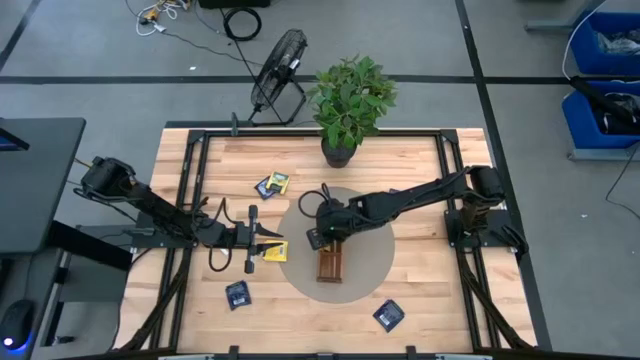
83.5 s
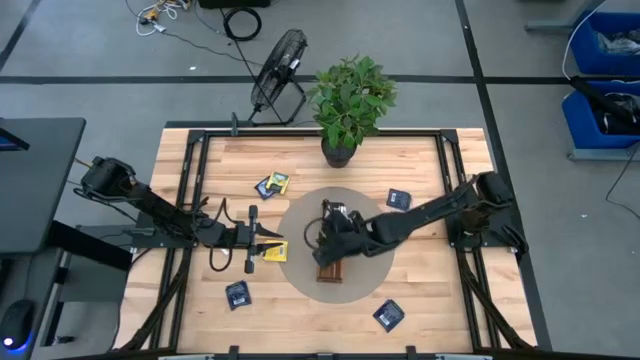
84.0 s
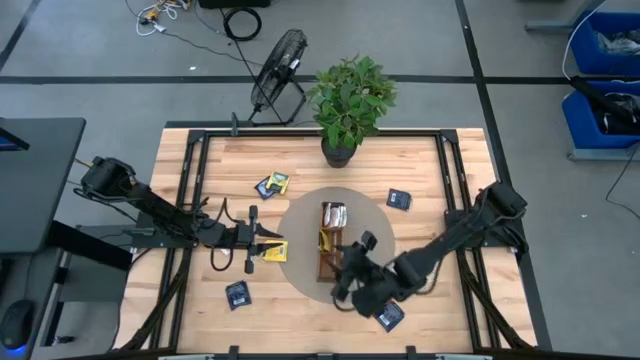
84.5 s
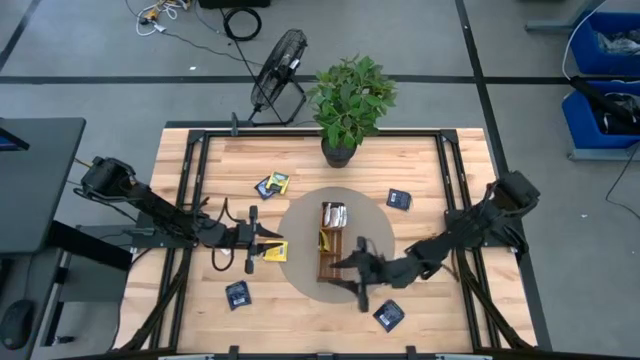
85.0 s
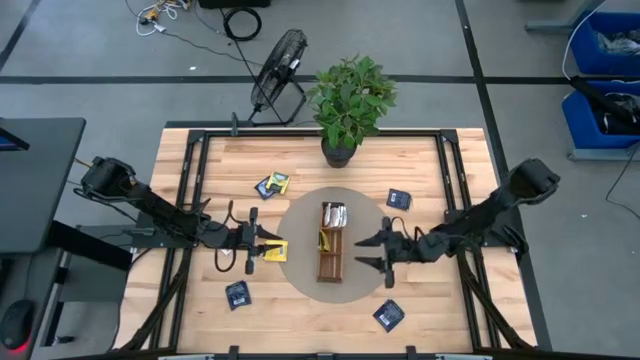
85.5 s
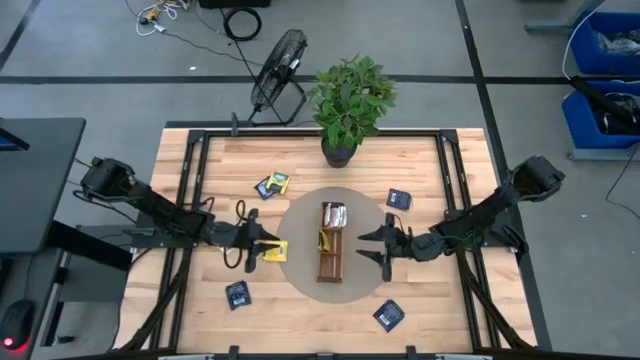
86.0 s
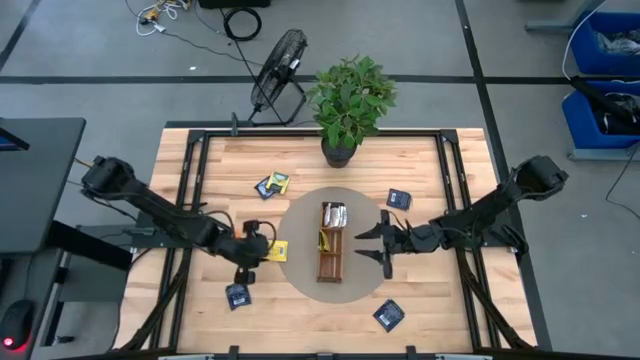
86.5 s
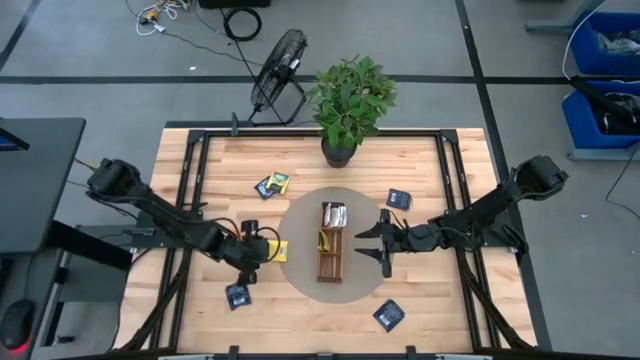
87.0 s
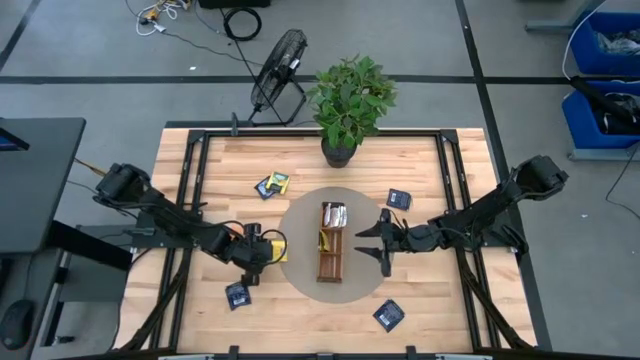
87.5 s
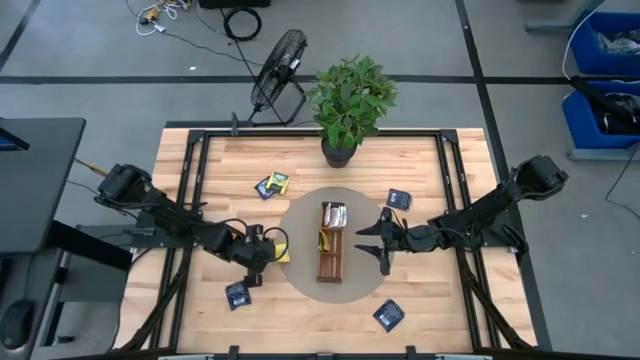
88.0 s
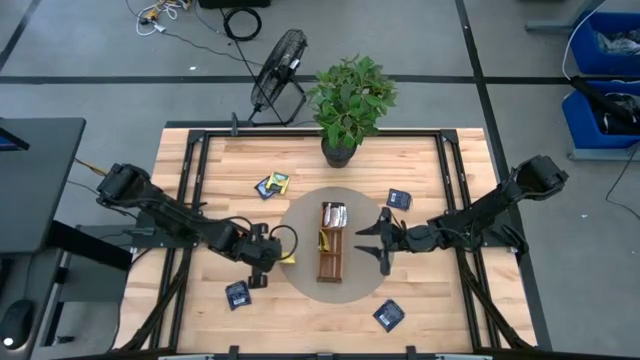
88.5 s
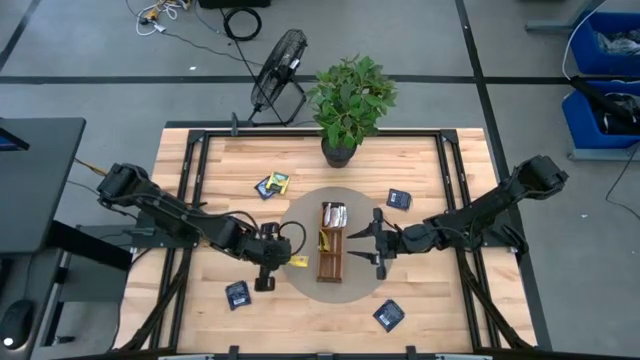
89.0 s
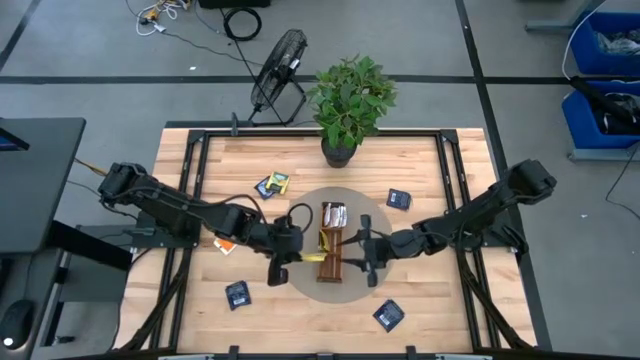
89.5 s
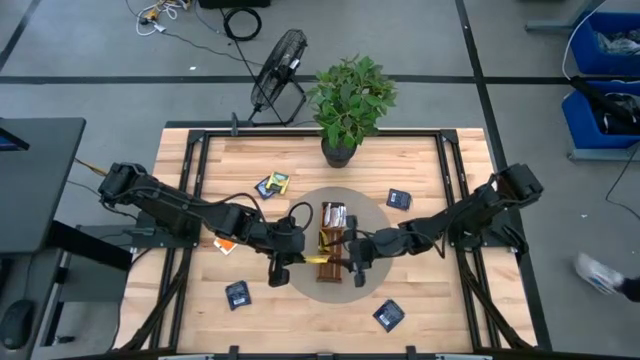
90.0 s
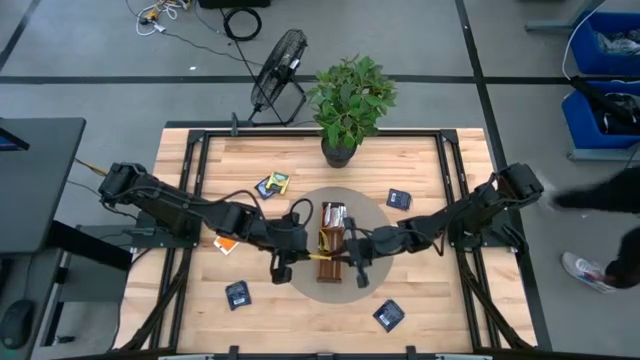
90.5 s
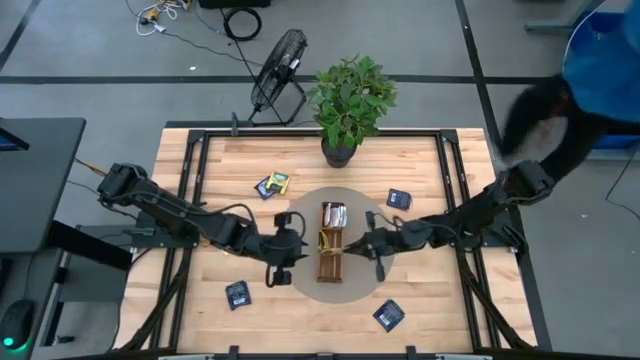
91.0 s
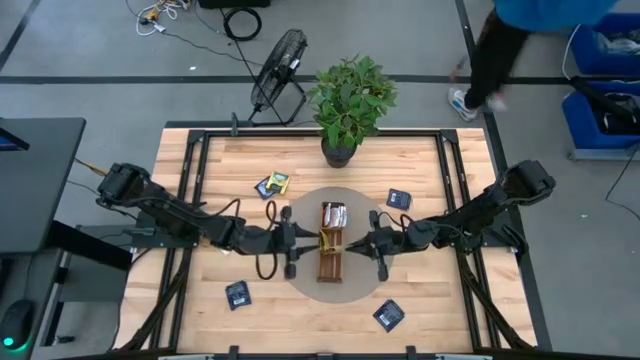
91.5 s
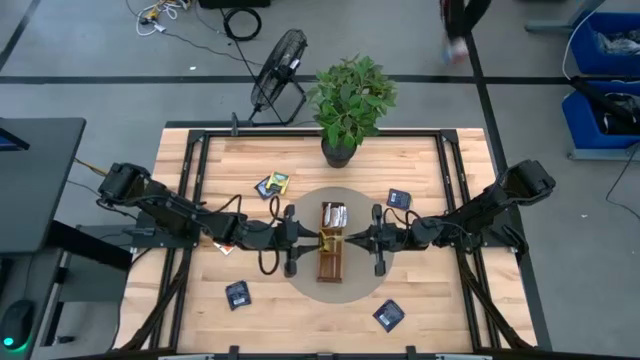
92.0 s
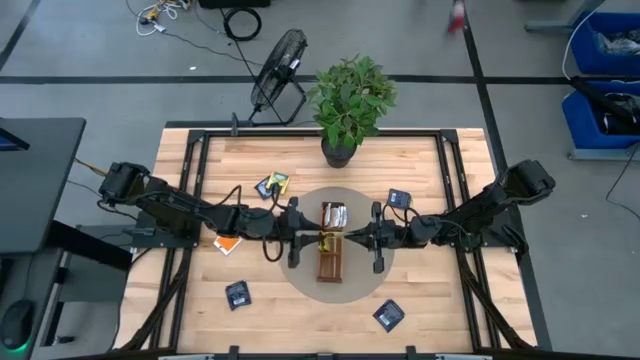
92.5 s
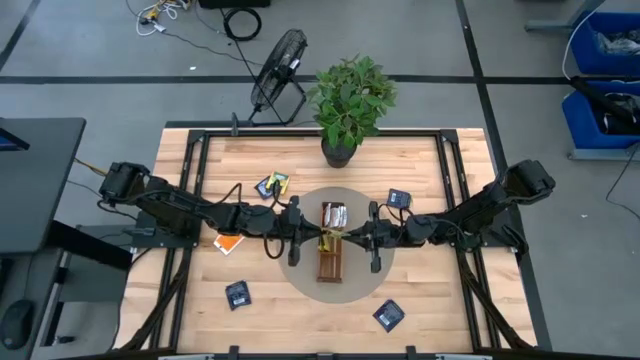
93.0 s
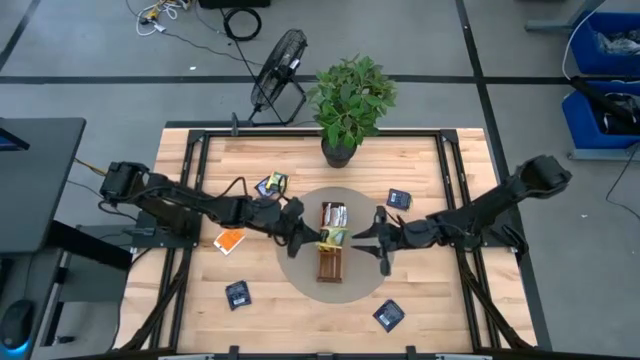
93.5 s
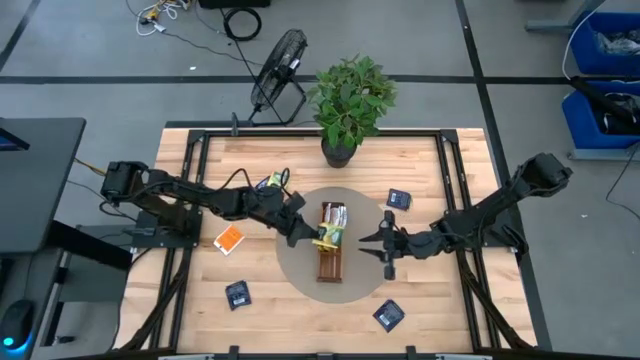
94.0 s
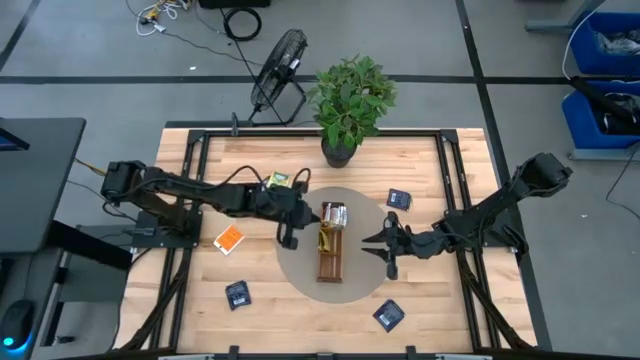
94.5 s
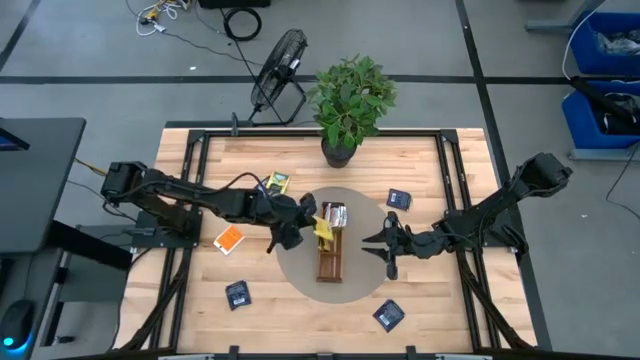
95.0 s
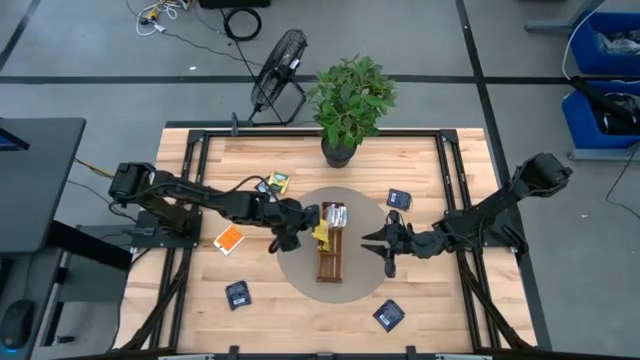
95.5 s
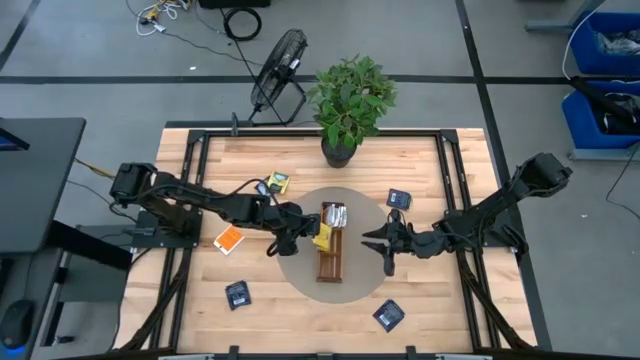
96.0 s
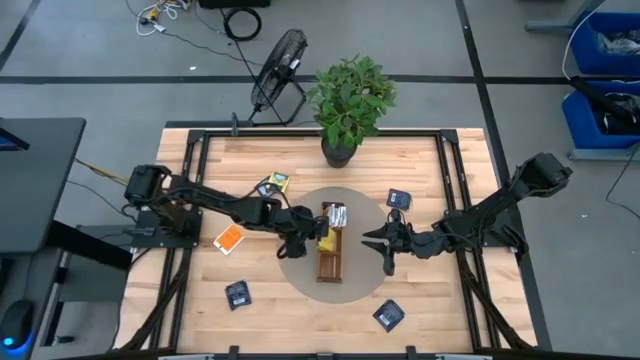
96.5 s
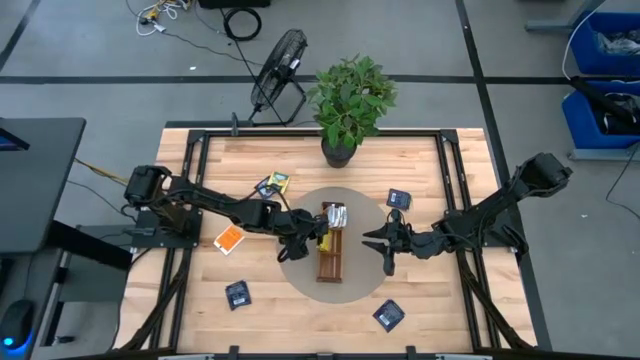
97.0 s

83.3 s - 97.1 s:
Task: Pick & Place Tea
Put the yellow tea bag into the middle compartment of the middle section wooden organizer

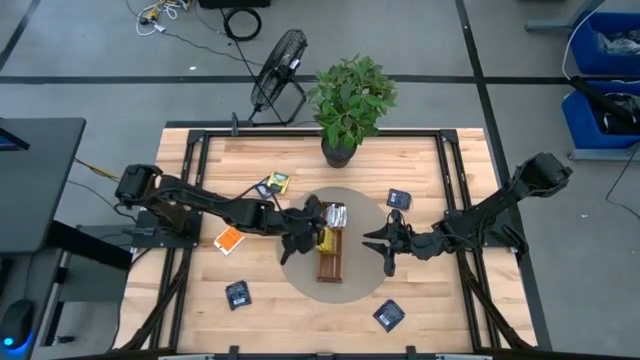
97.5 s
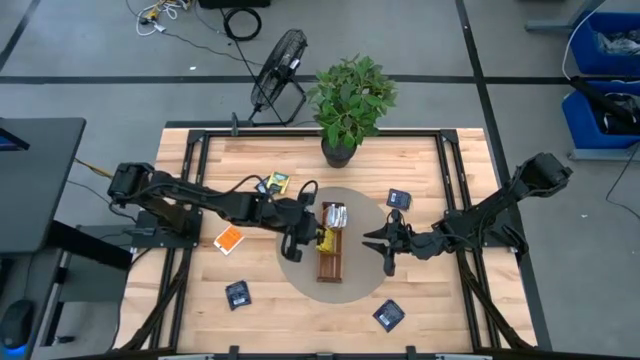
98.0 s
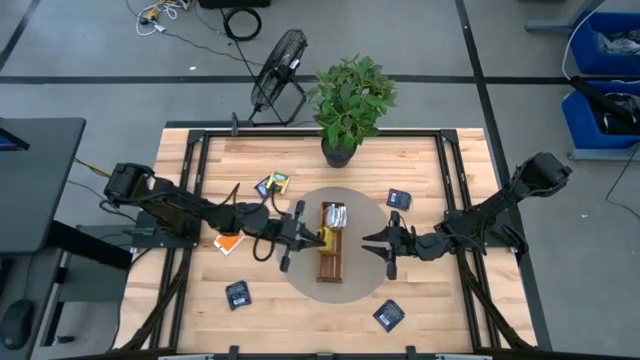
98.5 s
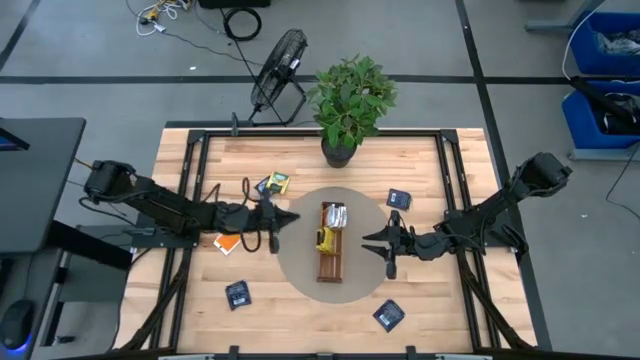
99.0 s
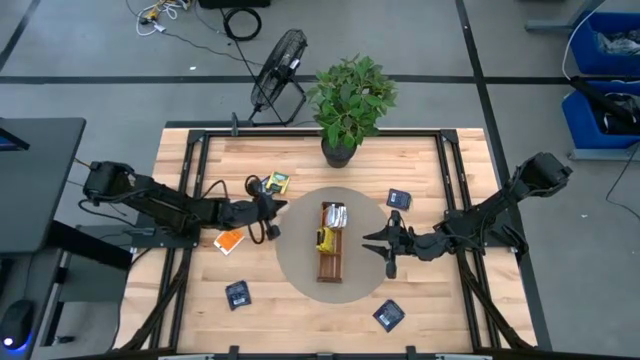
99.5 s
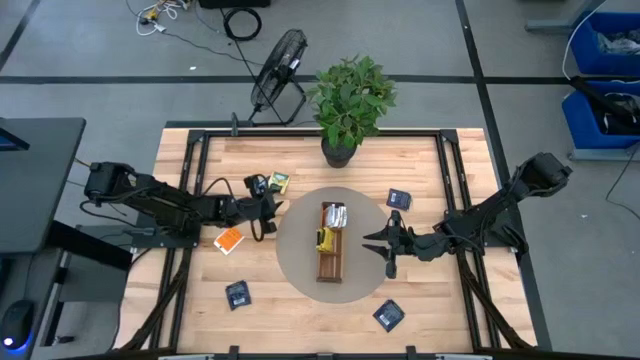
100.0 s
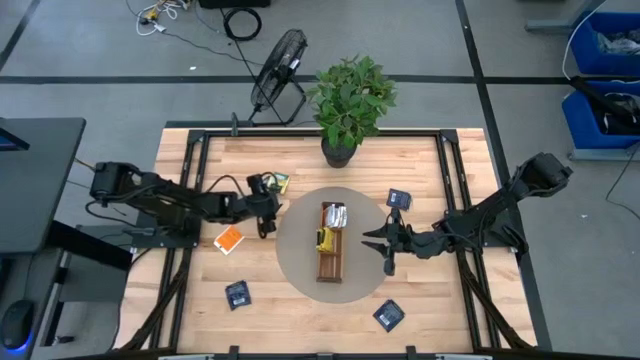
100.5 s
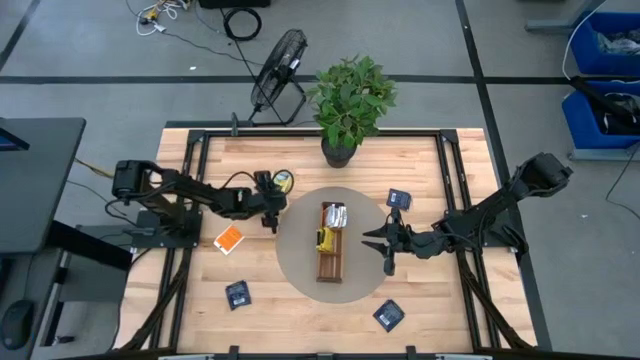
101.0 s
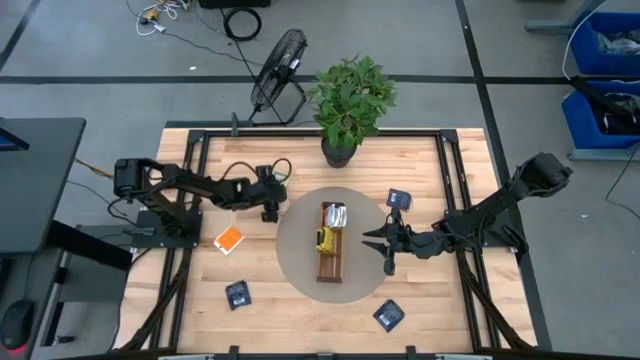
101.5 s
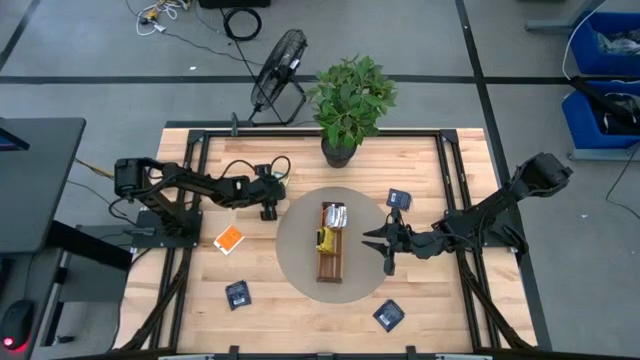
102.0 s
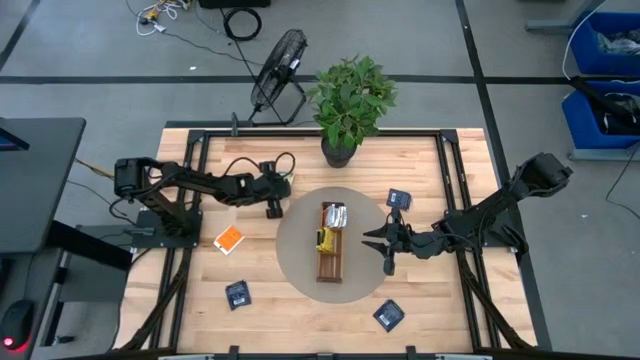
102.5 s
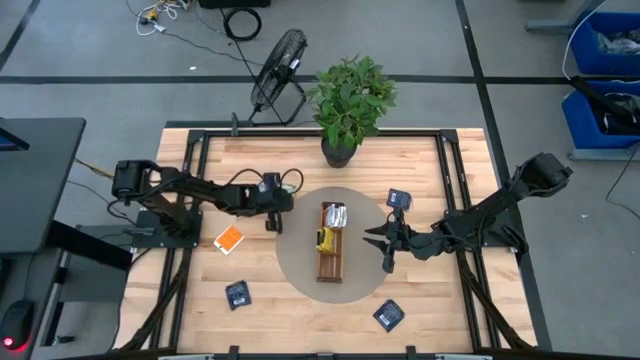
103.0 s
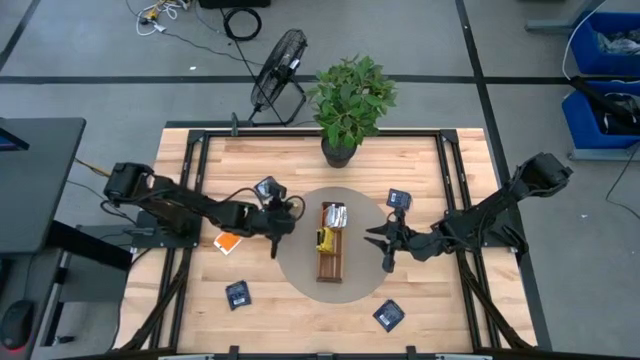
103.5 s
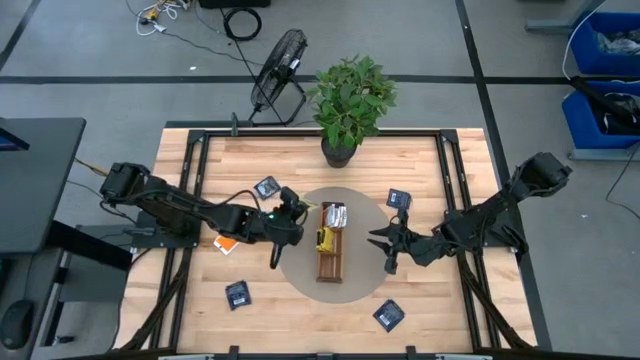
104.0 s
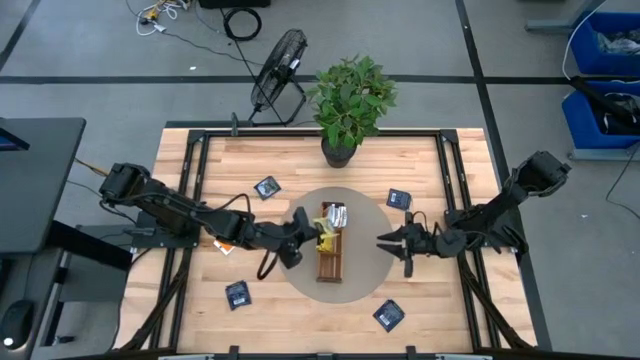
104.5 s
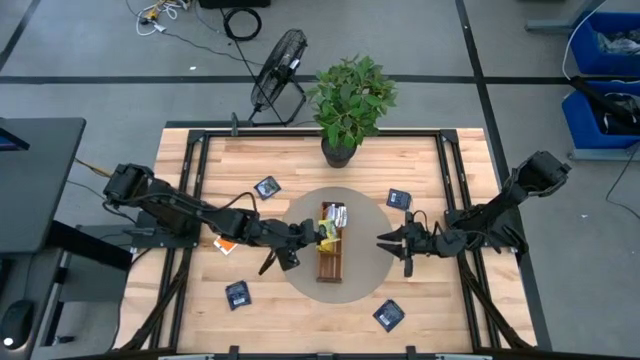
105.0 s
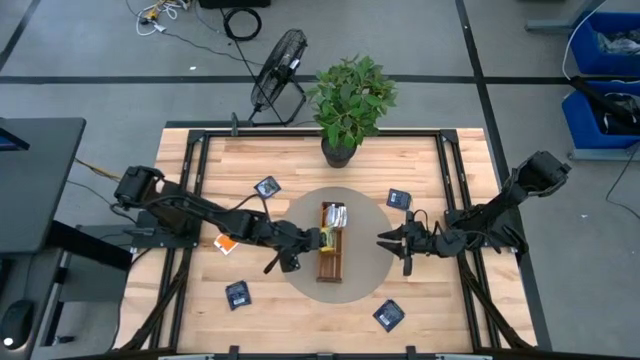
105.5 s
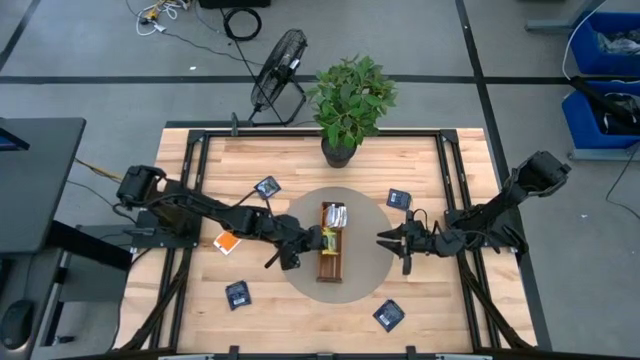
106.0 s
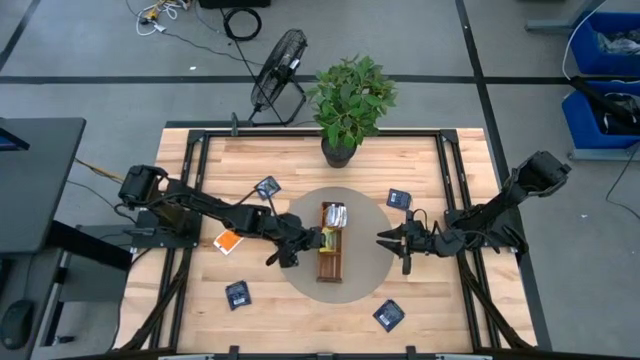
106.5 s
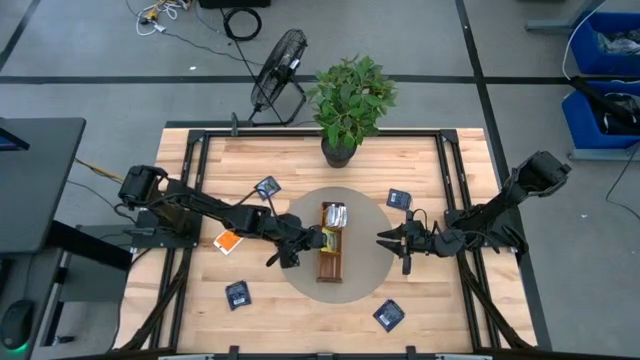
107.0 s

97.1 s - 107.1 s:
Put the yellow tea bag into the middle compartment of the middle section wooden organizer
